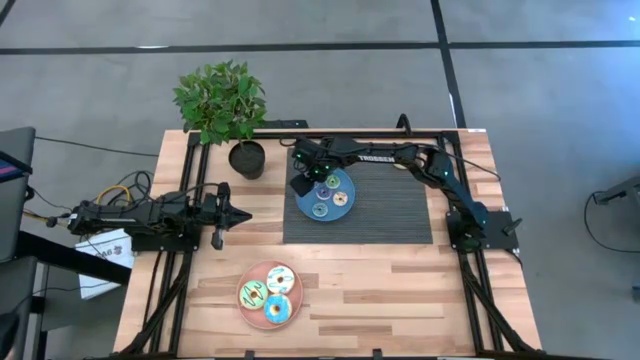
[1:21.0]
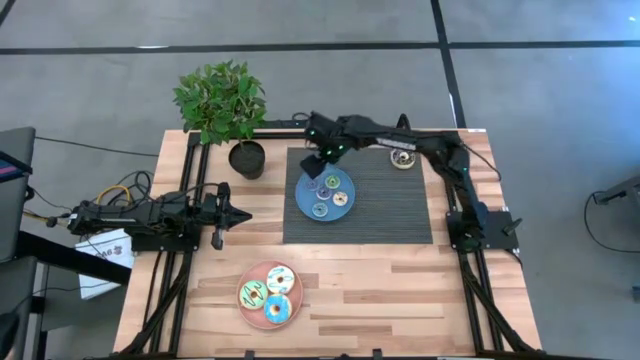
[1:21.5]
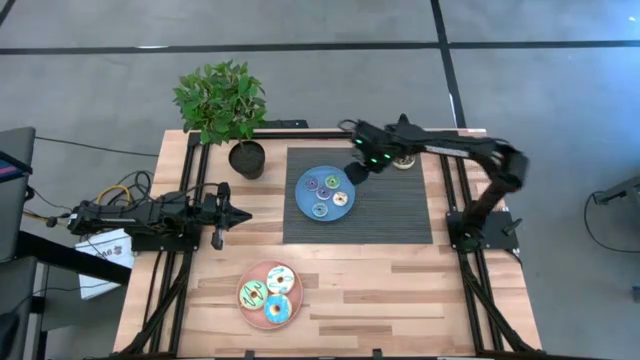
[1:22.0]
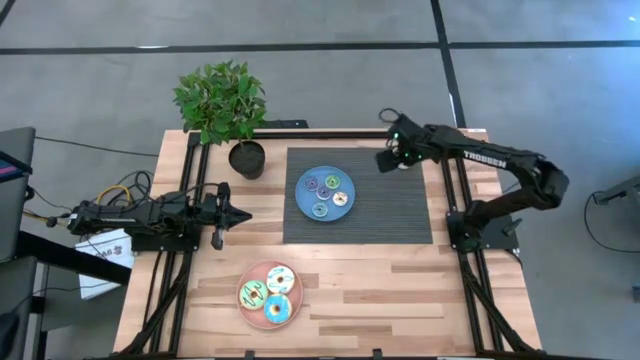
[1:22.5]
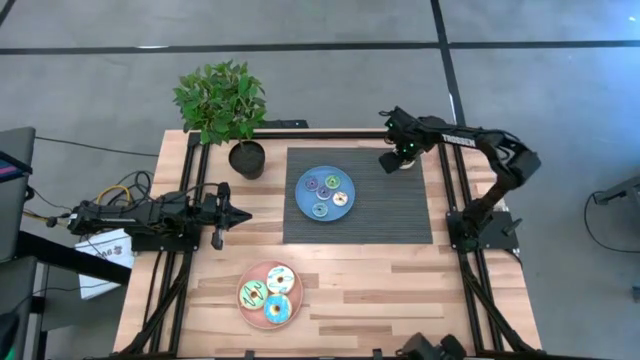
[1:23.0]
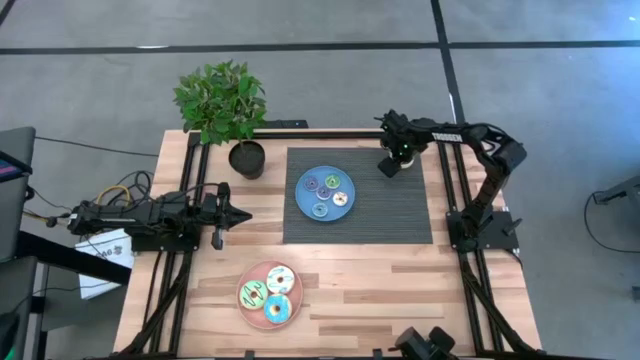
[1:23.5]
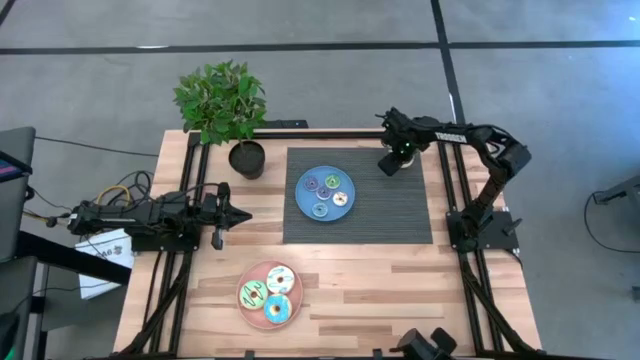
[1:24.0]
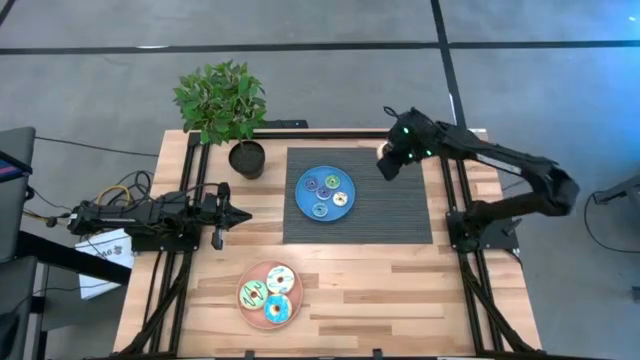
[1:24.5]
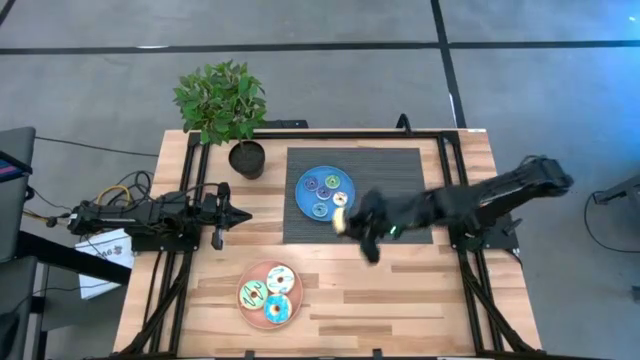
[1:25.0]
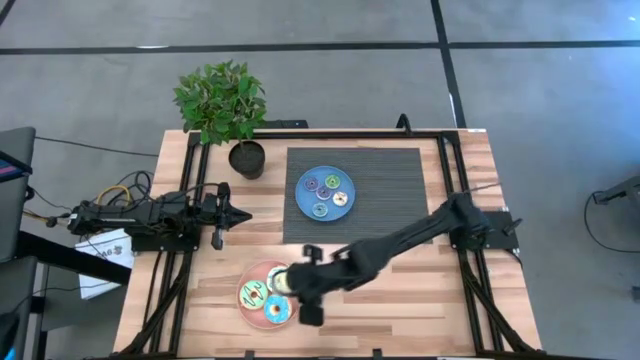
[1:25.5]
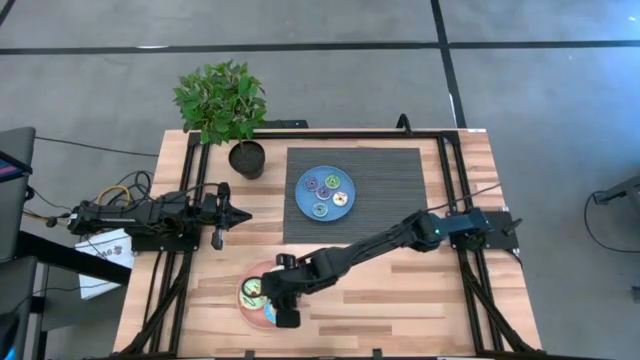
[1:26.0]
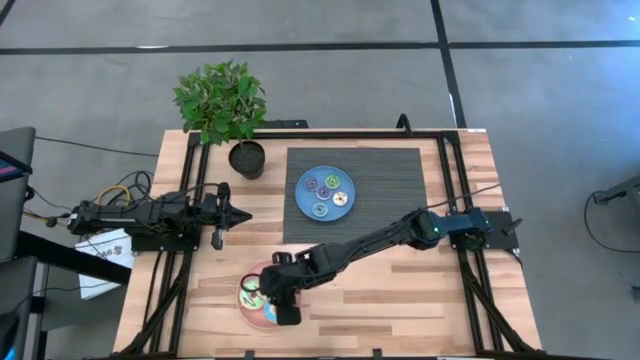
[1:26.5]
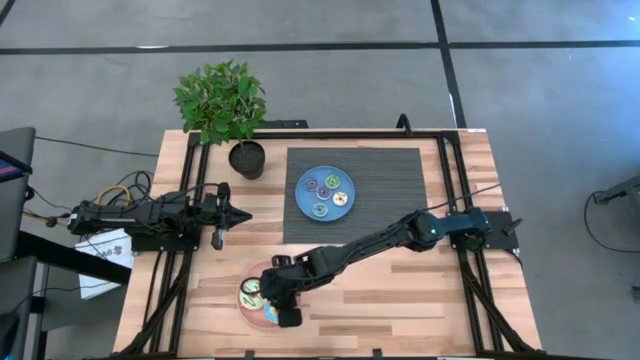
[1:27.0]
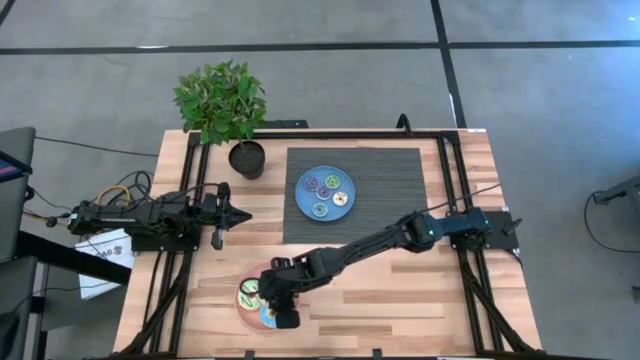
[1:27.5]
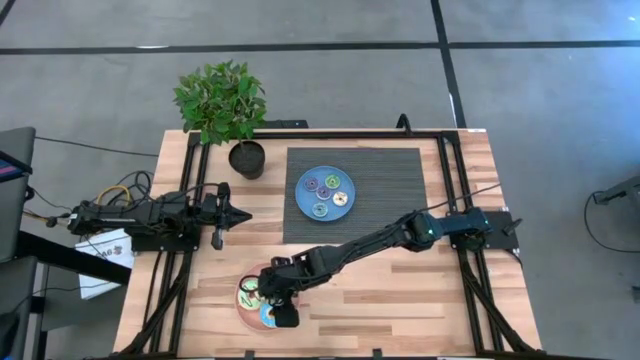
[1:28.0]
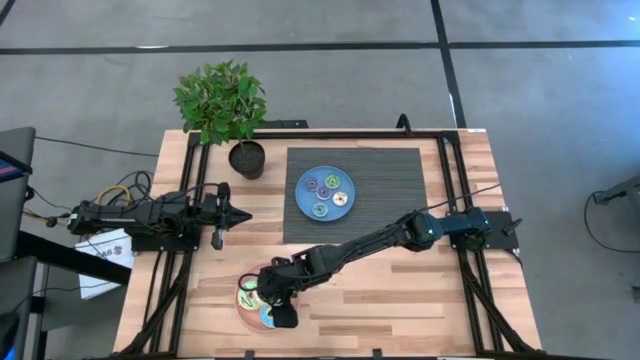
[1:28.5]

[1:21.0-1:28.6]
Task: Pick & Place donuts
Put the large black donut on the light orange plate

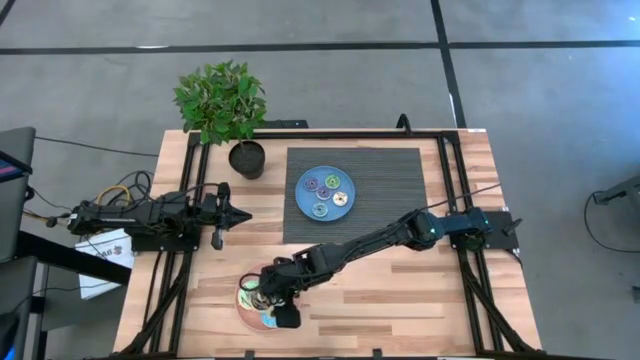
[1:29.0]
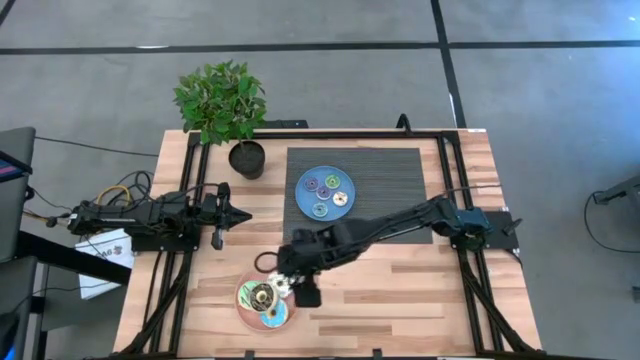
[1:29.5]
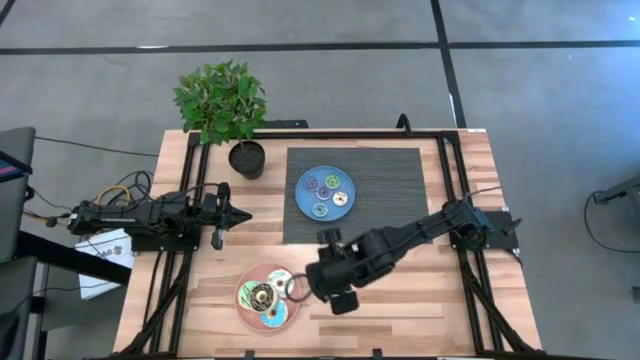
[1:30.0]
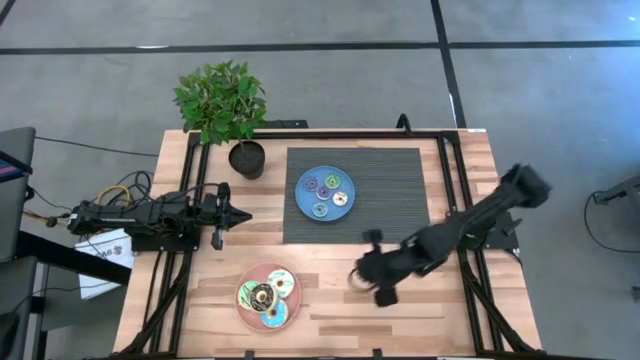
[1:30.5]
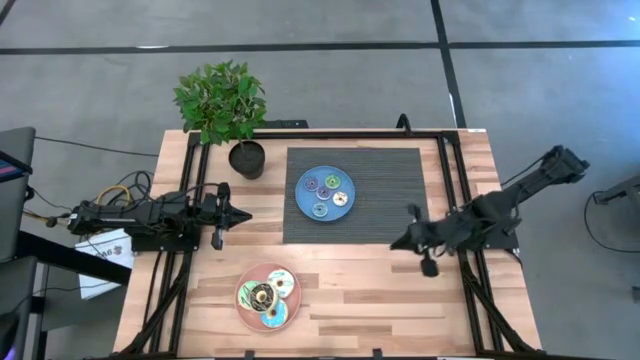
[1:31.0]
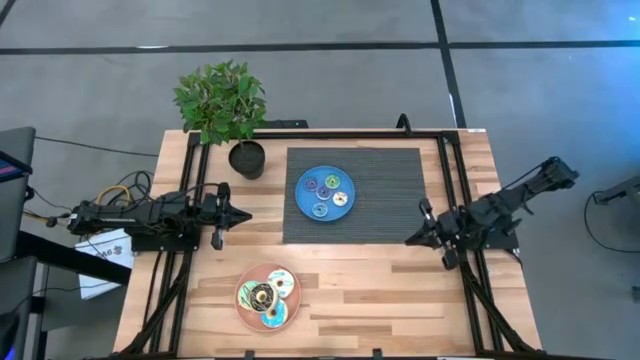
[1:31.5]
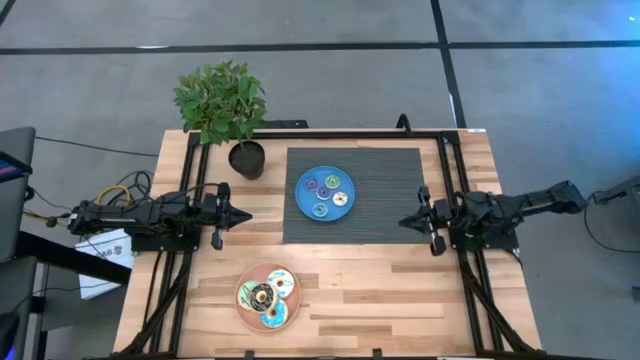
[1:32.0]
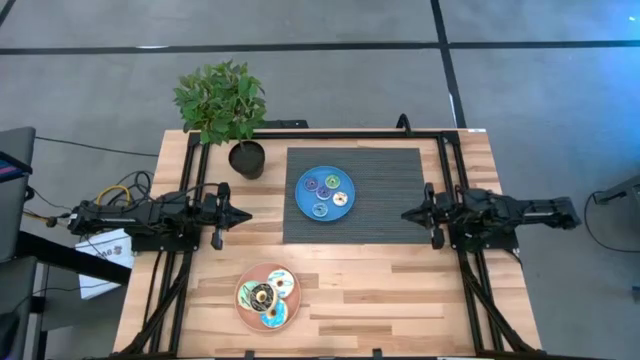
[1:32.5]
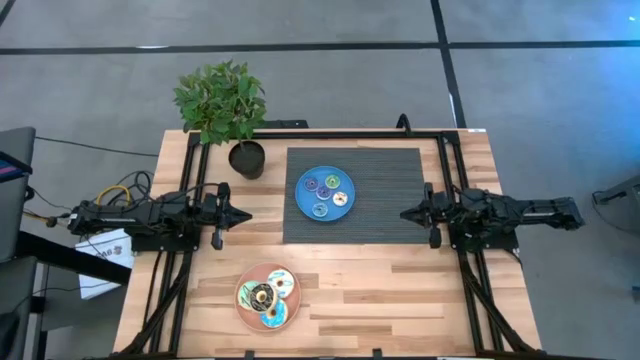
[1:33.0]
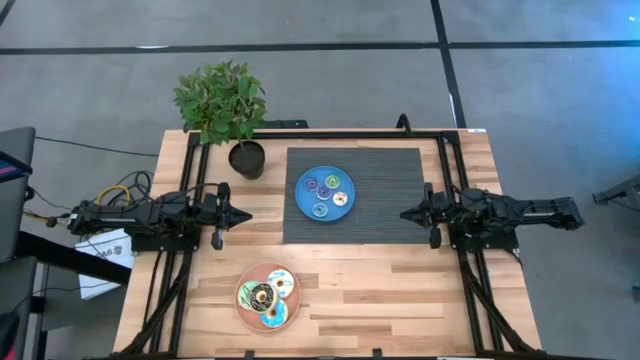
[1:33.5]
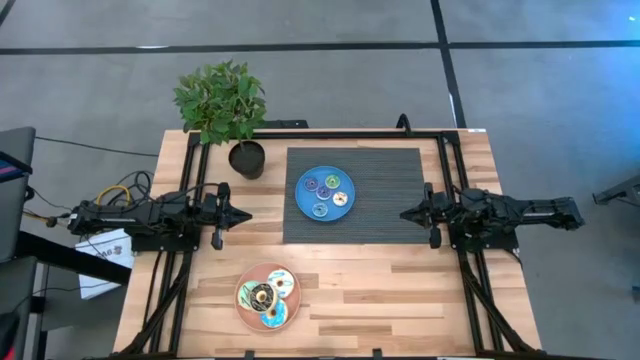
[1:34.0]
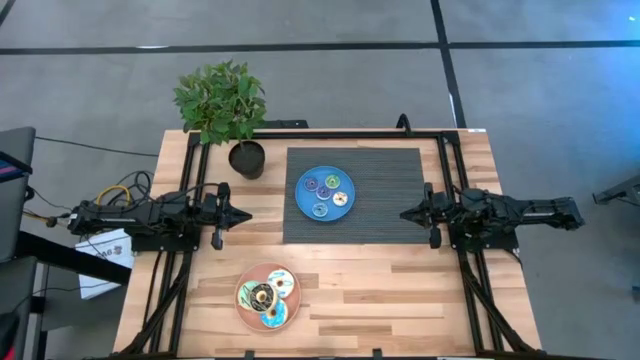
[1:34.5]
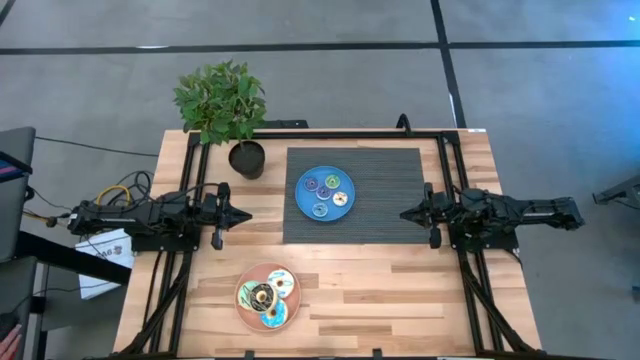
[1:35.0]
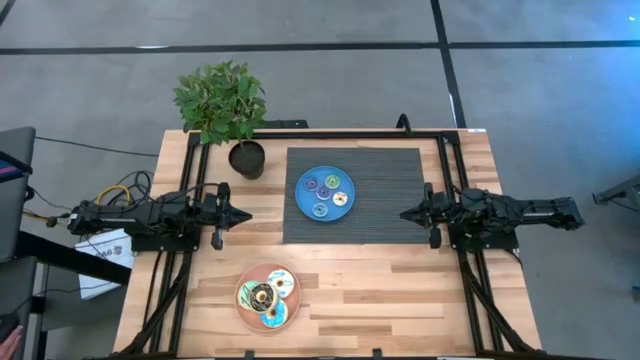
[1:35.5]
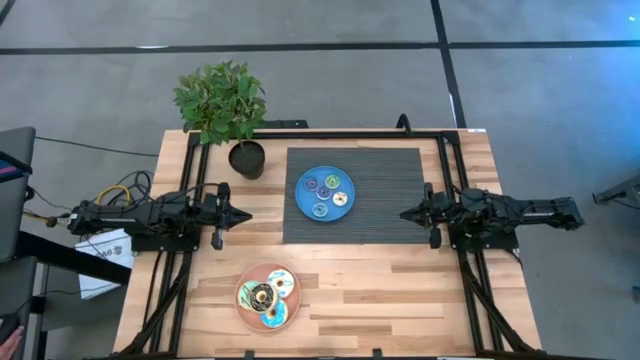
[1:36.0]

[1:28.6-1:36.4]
Return to home position

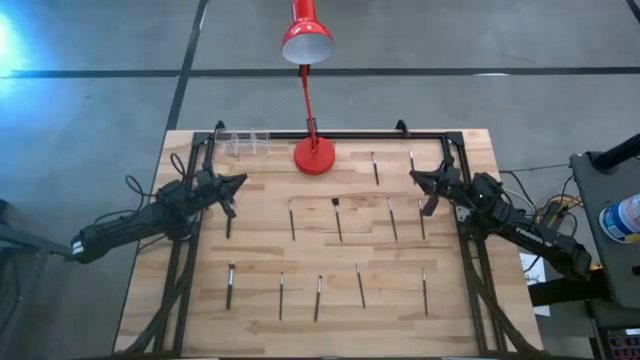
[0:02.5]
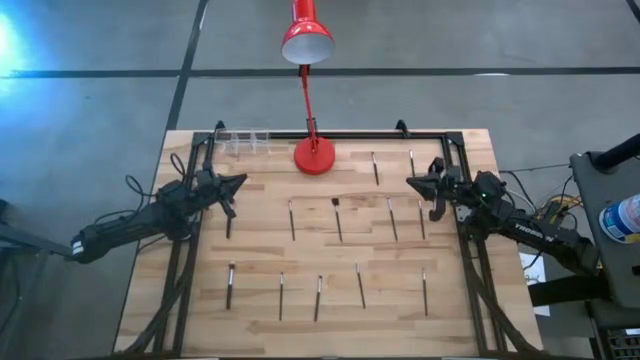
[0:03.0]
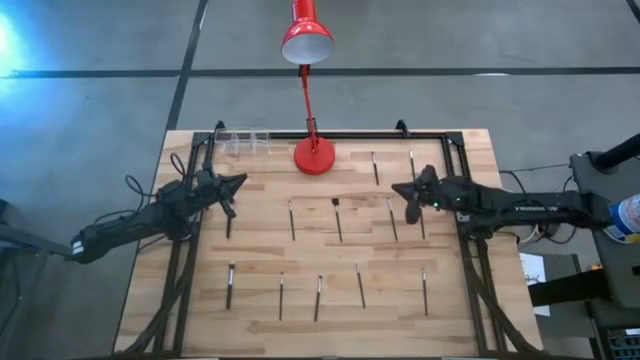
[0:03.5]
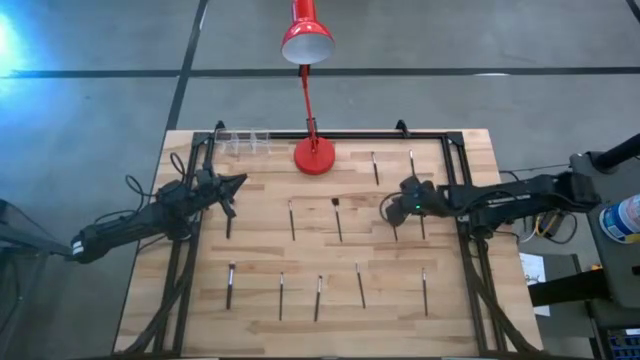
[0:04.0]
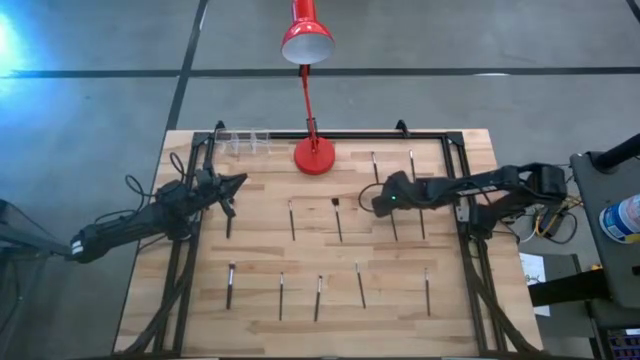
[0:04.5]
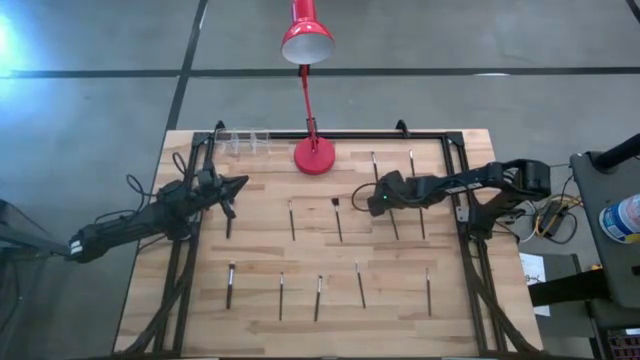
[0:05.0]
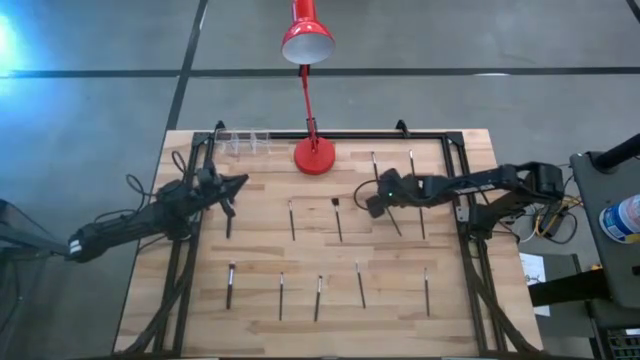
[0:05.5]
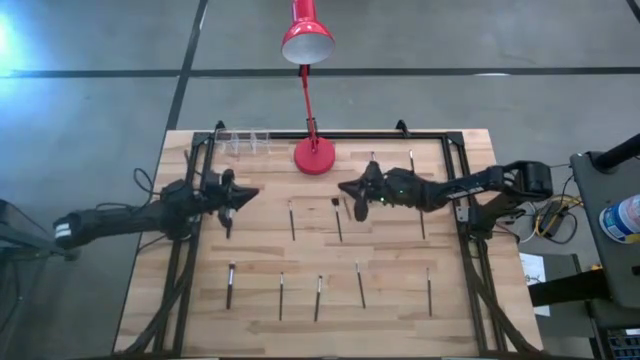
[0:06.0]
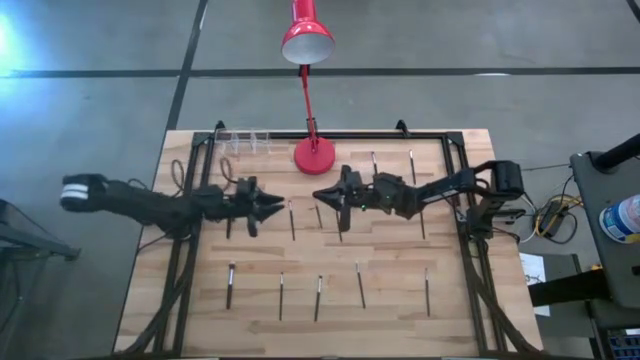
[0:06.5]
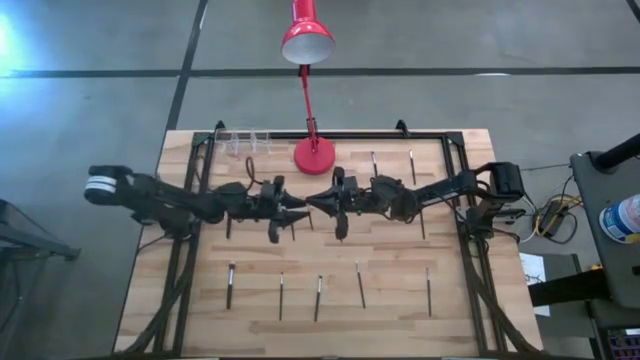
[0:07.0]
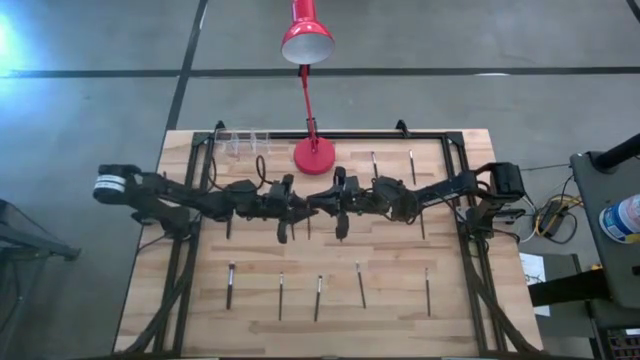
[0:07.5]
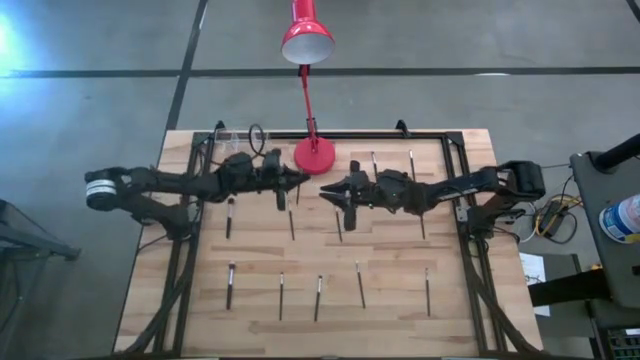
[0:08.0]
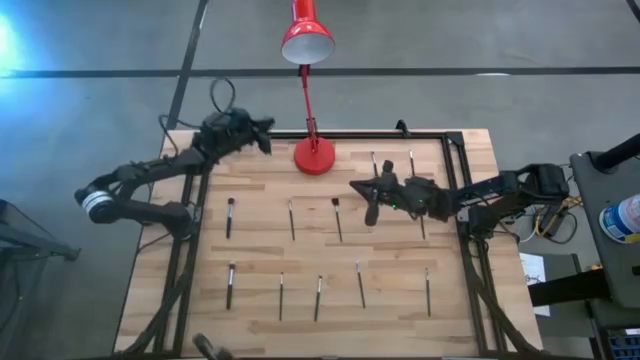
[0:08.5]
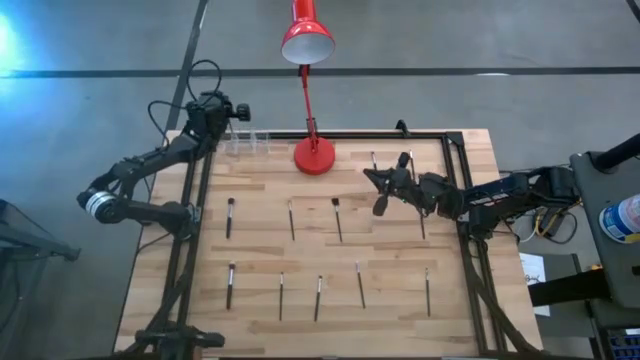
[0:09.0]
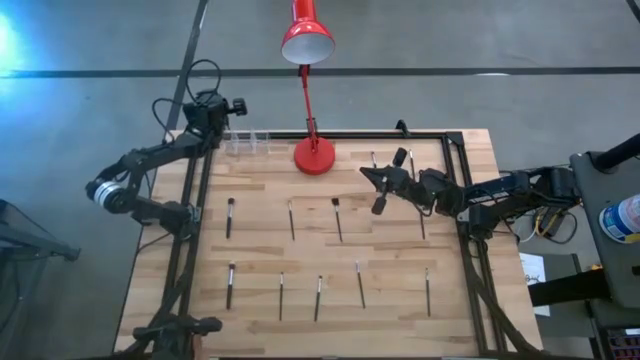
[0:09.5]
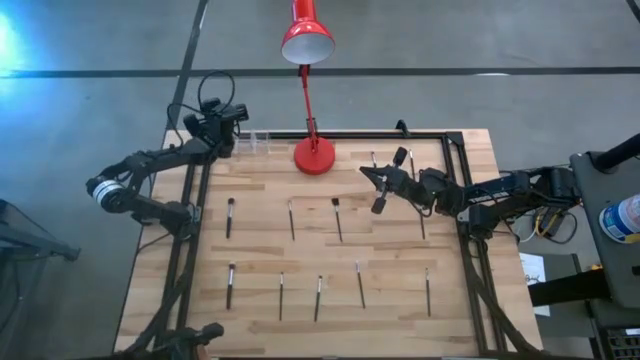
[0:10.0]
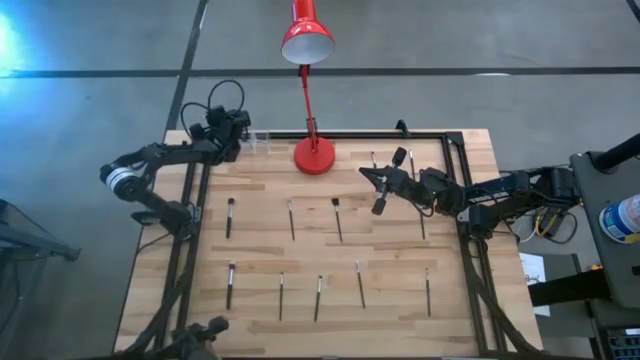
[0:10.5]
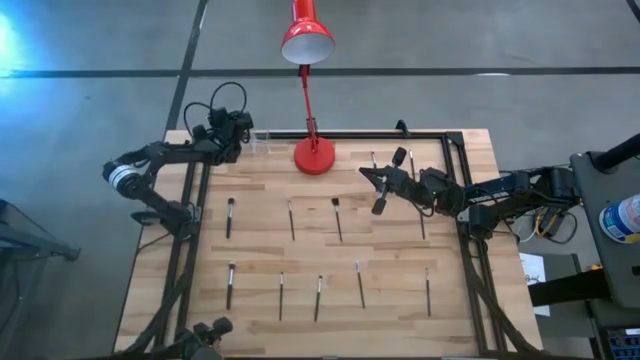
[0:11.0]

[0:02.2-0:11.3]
Task: Pick & Place Makeup Supplies
Put the makeup brush into the transparent organizer
